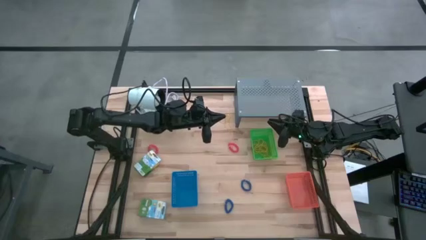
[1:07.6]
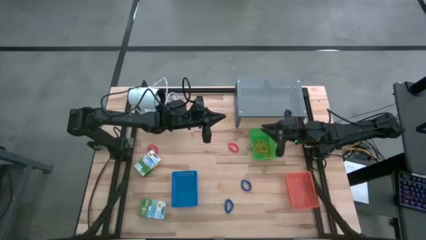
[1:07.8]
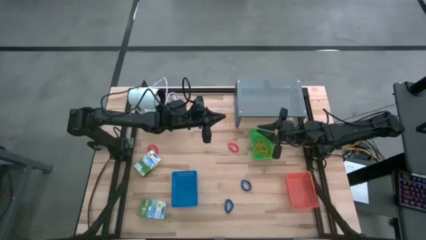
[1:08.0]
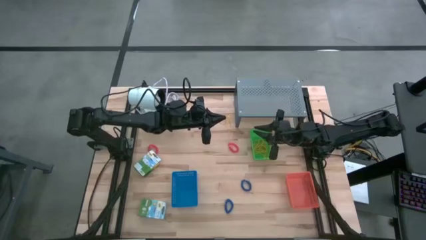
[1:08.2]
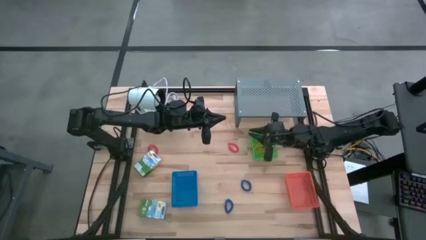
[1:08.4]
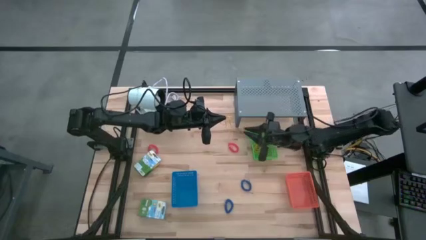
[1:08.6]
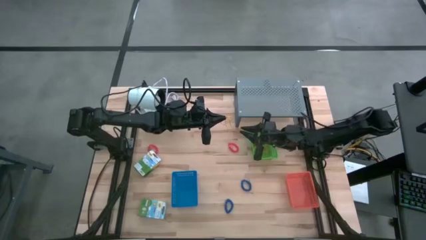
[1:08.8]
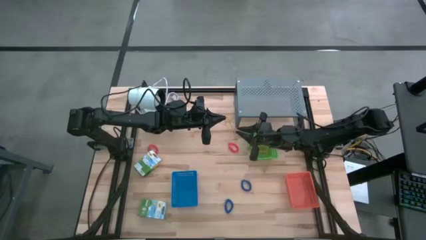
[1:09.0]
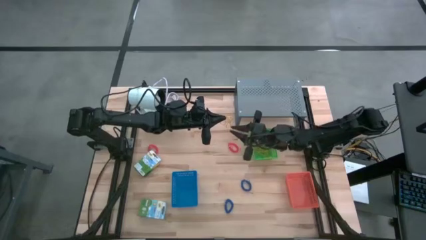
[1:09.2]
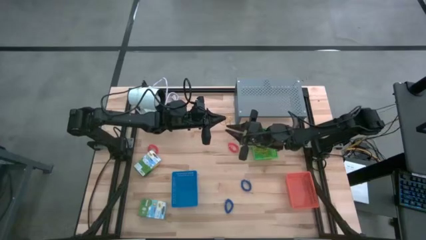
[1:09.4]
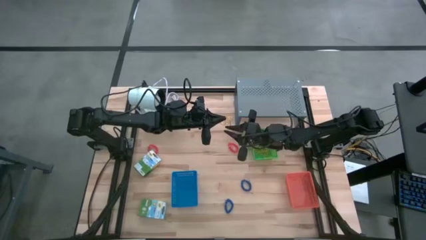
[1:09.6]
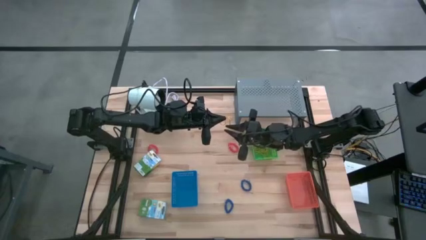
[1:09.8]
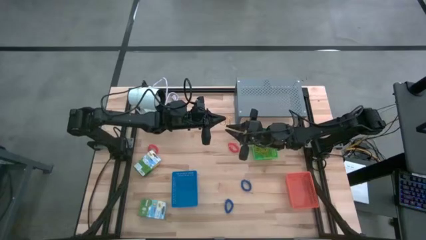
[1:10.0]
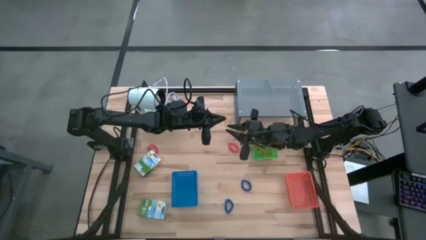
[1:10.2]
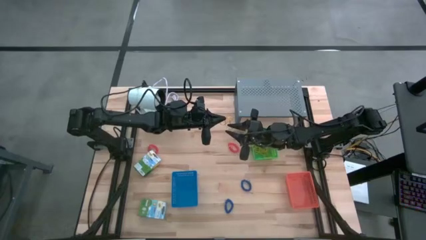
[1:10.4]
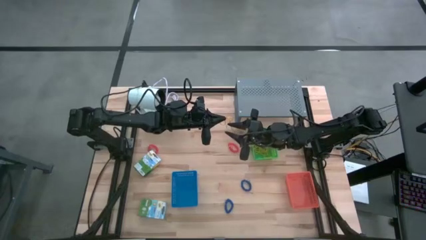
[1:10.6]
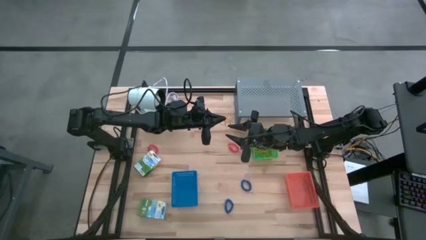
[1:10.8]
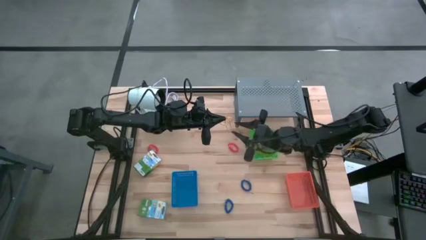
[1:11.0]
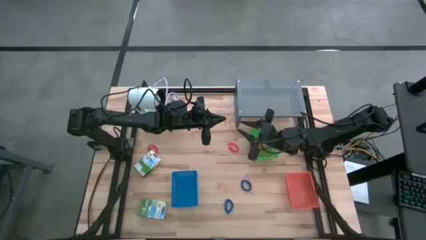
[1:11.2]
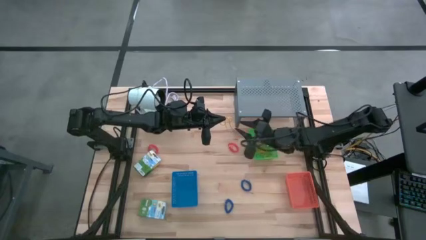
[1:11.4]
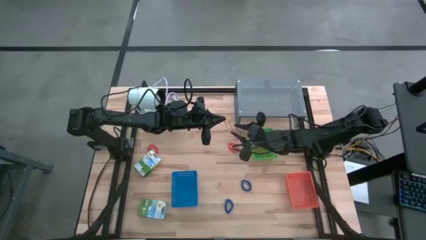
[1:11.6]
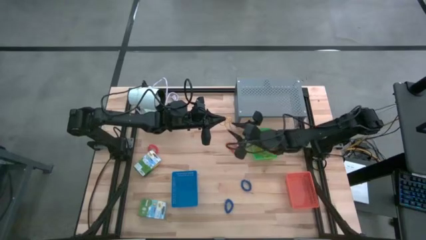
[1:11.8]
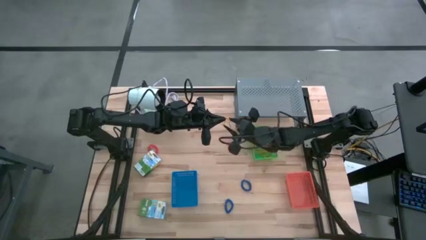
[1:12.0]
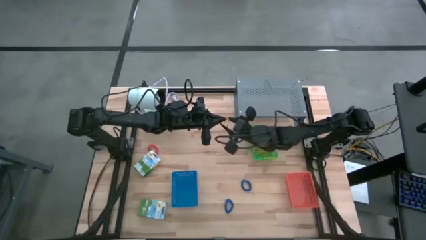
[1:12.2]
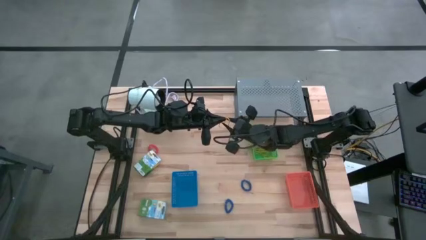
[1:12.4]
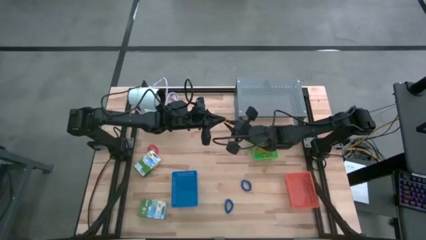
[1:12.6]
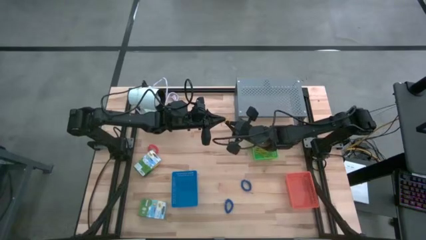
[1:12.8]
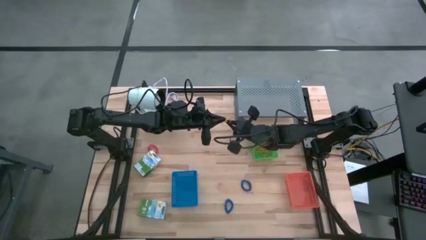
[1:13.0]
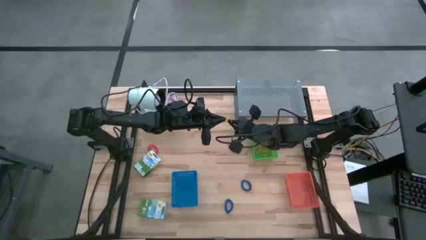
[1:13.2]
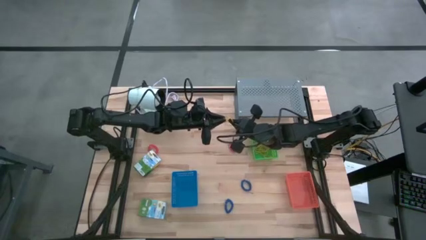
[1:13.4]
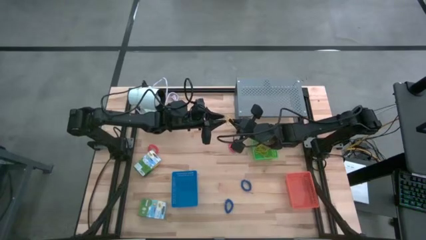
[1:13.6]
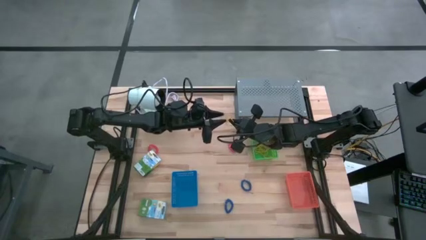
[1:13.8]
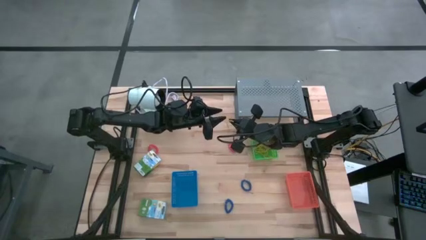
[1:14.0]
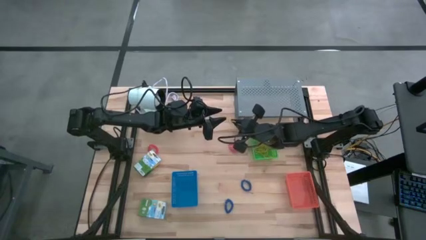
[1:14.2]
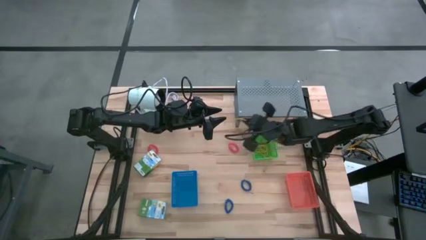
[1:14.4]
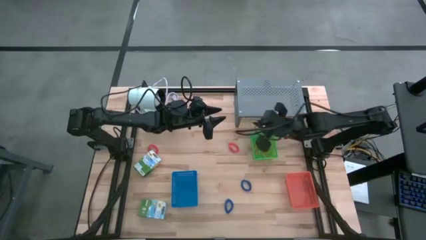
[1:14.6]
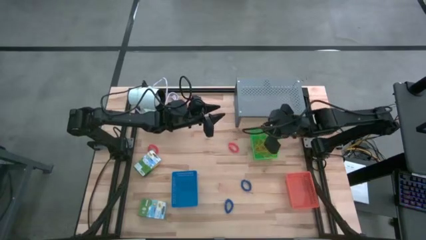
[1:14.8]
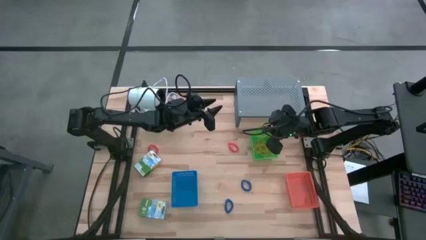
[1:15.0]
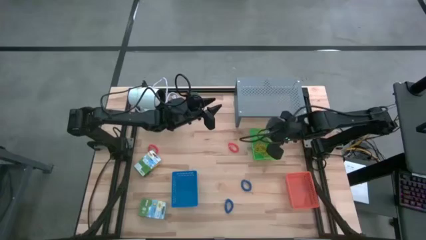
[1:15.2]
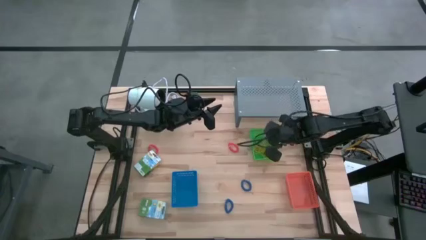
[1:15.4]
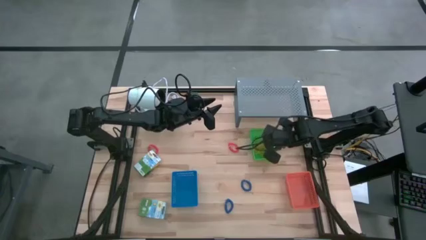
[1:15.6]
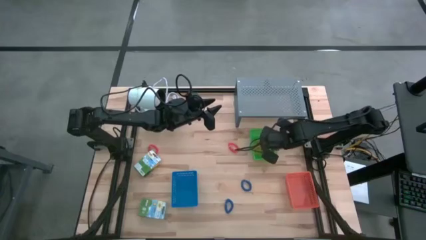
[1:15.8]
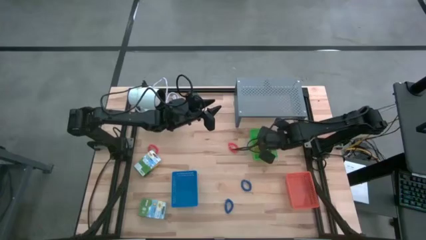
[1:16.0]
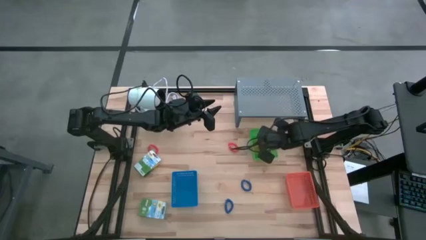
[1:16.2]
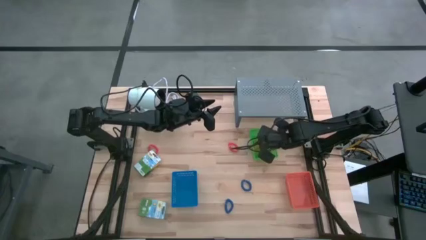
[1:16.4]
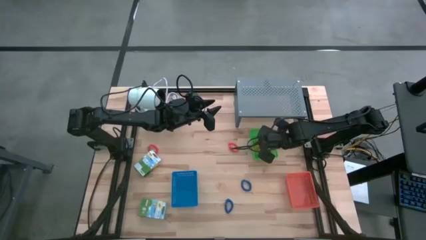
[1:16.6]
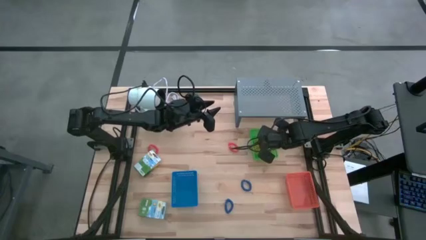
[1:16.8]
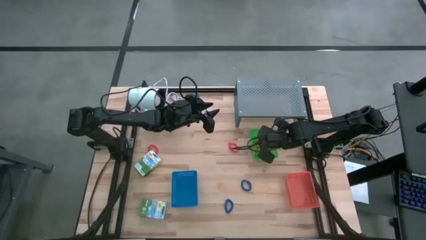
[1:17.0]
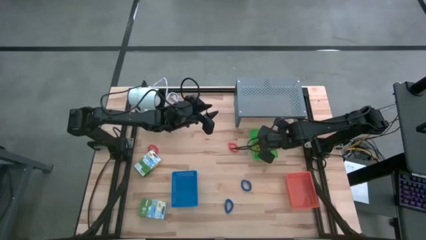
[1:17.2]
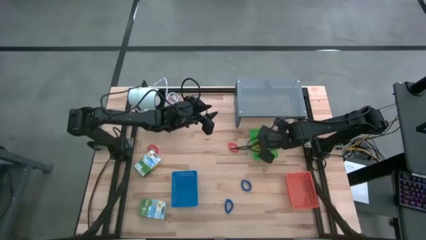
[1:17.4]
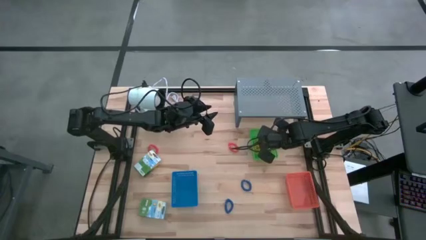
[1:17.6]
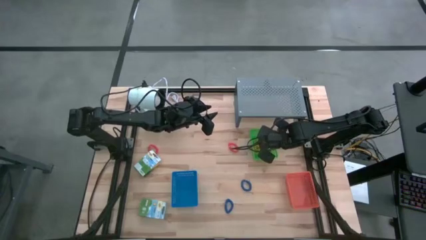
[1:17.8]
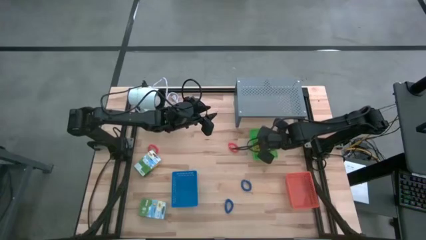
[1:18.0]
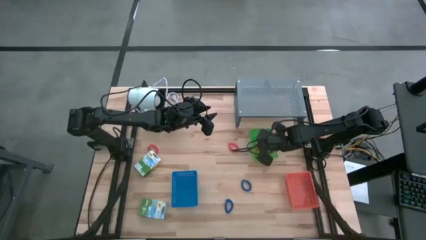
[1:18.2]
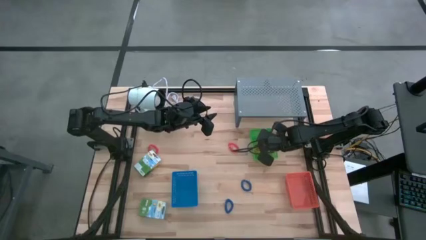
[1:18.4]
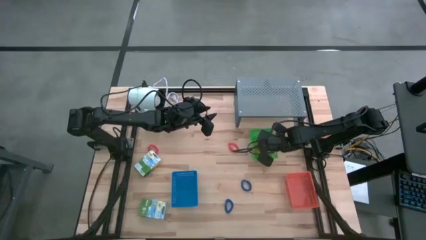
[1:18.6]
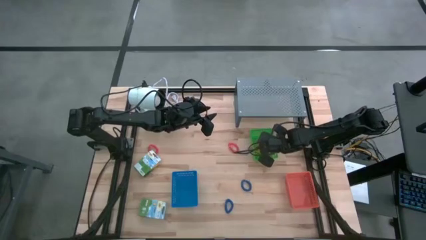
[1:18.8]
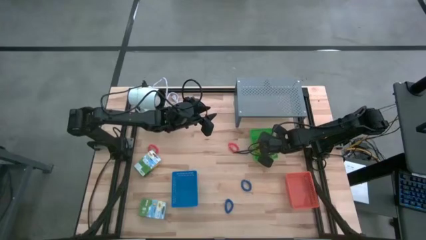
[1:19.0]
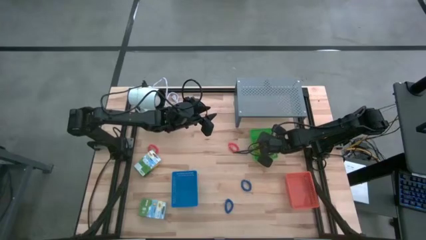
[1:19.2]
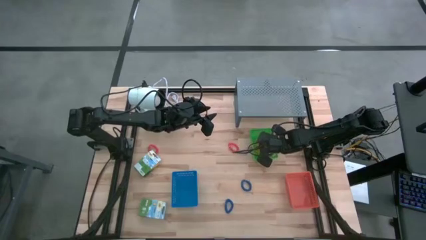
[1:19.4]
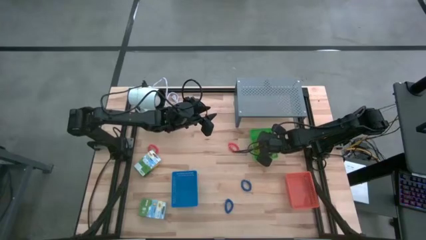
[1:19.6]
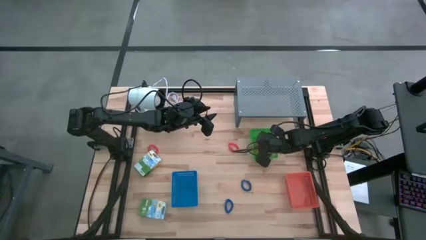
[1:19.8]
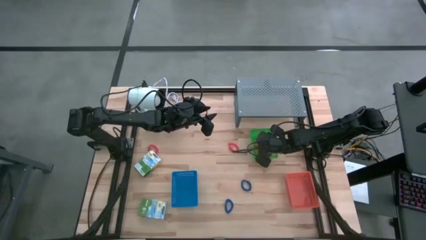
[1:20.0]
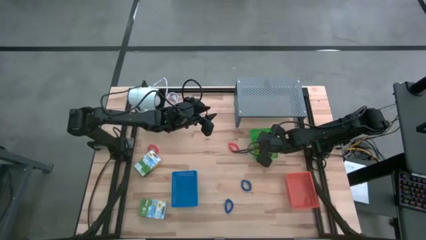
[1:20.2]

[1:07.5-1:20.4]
Task: Pick & Place Office Desk Supplies
Put the yellow rubber band into the green bin

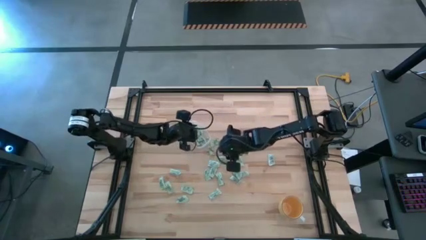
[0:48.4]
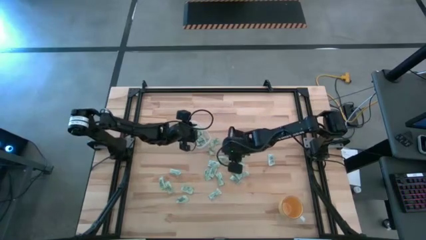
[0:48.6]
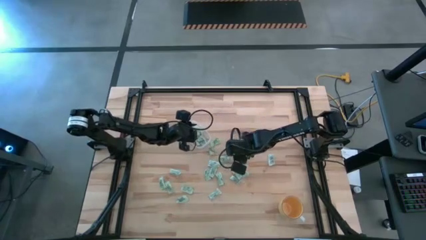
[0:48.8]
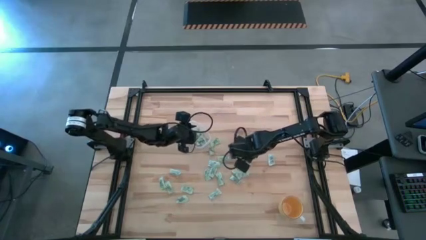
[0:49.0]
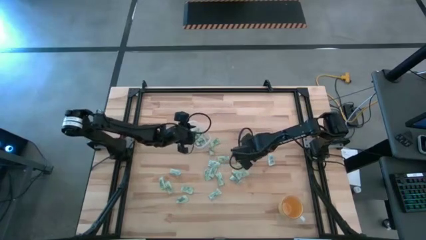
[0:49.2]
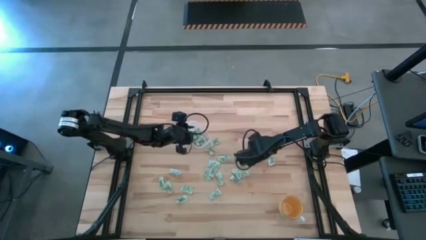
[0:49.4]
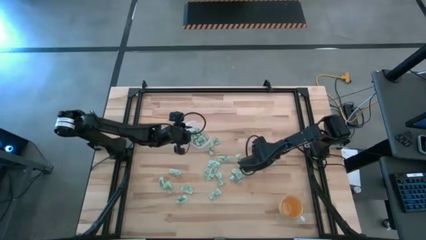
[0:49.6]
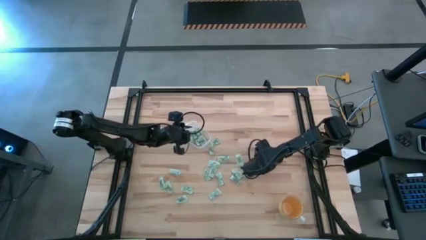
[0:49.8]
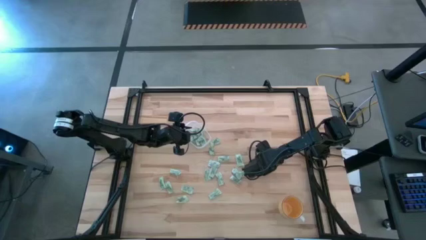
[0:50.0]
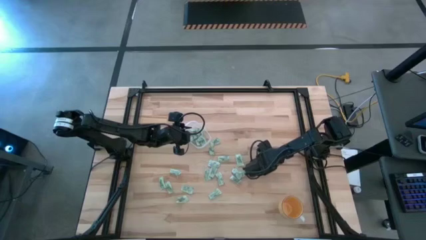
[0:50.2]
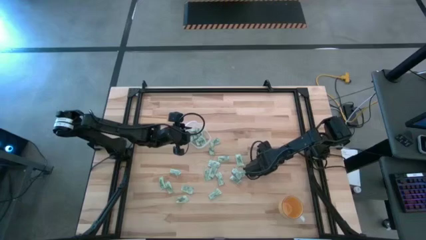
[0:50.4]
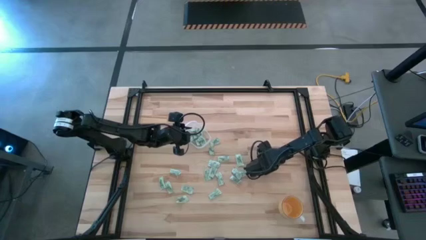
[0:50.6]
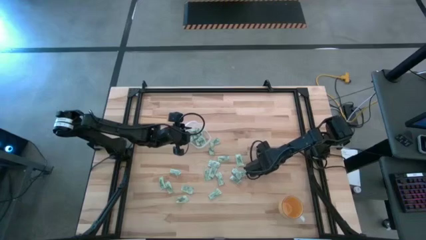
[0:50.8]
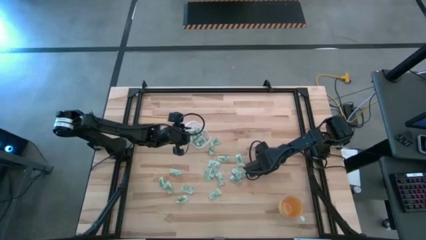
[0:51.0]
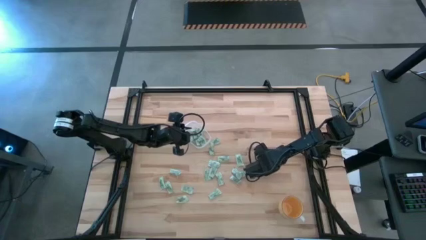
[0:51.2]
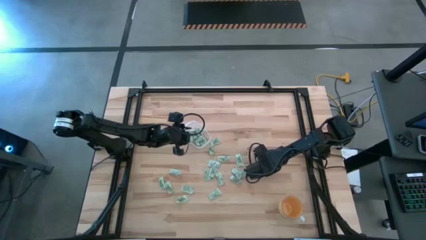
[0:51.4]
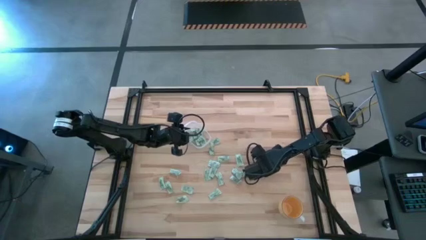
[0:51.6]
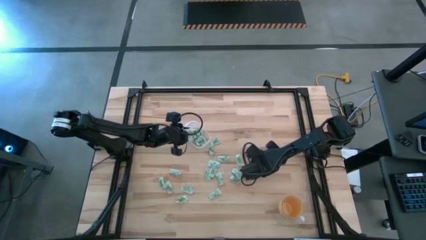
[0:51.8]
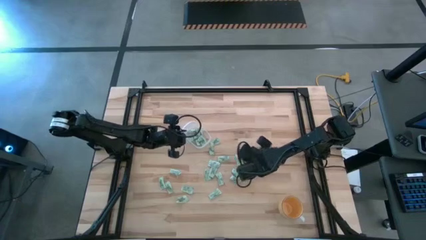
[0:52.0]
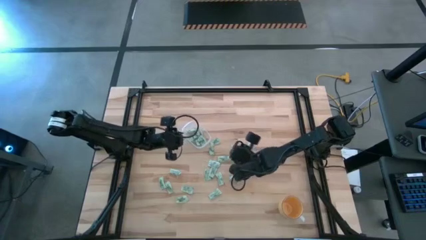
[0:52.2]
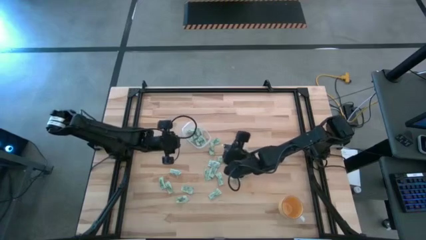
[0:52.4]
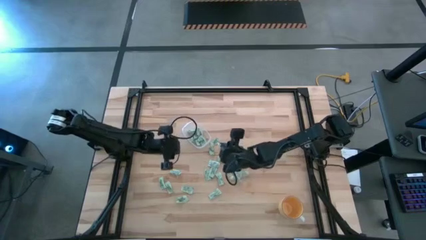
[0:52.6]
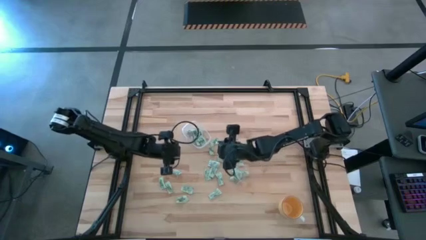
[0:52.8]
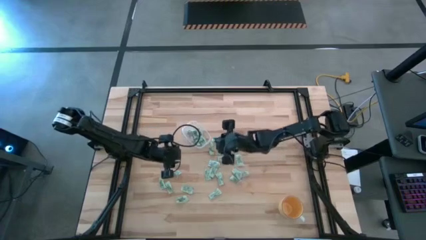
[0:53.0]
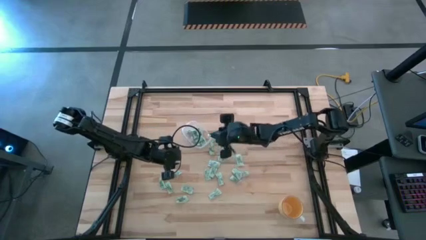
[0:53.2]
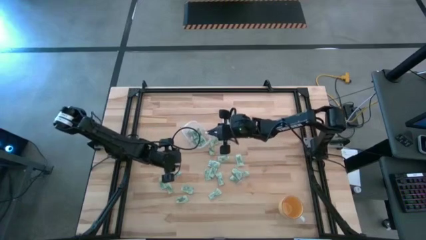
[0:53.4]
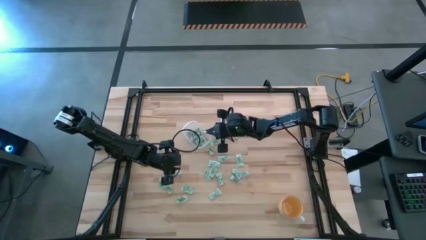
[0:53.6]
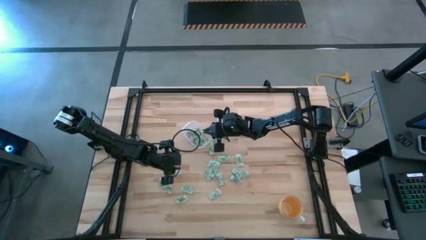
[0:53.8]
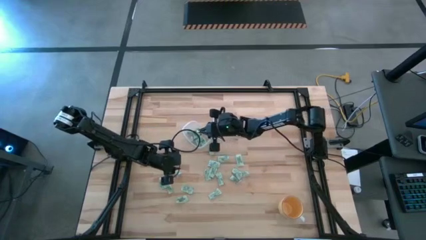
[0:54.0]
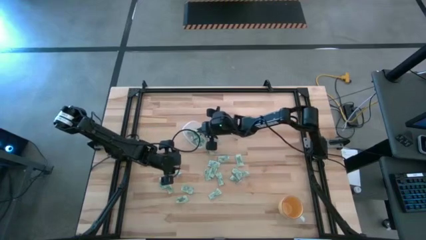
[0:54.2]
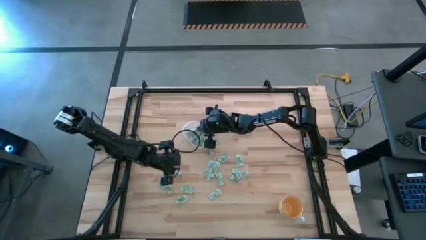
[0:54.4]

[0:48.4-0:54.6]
Task: Pick and place Stevia / Truvia into bins
Put the stevia packet into the transparent bin
